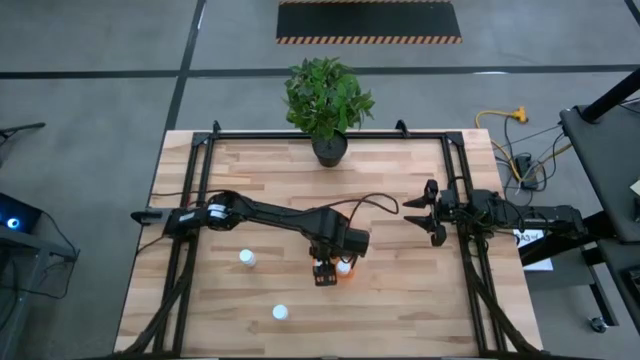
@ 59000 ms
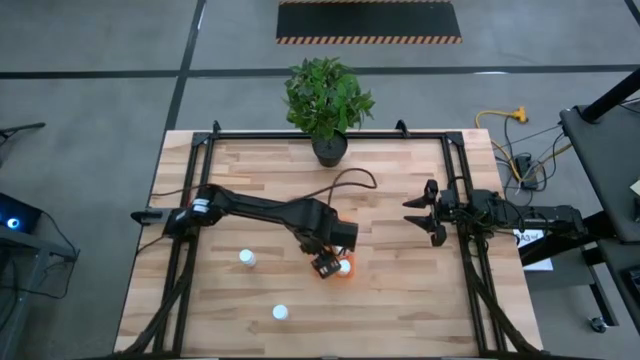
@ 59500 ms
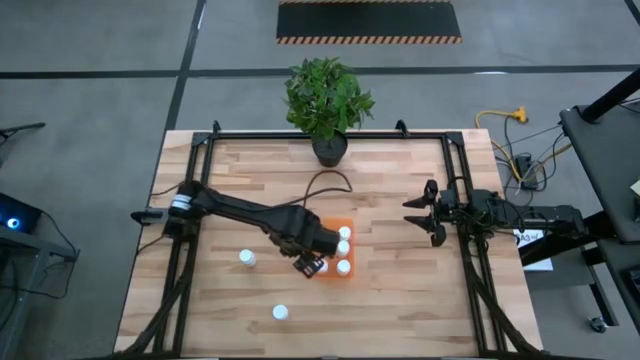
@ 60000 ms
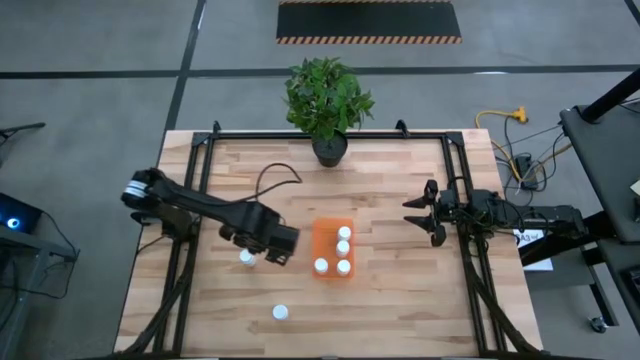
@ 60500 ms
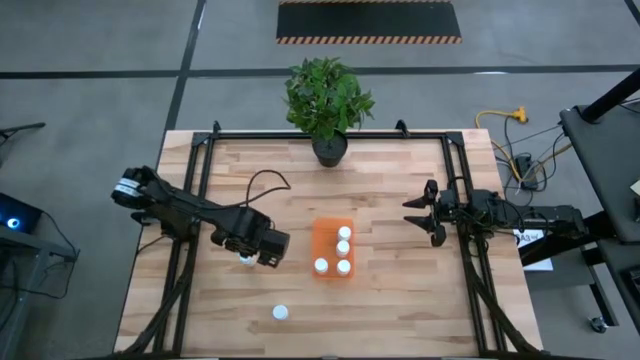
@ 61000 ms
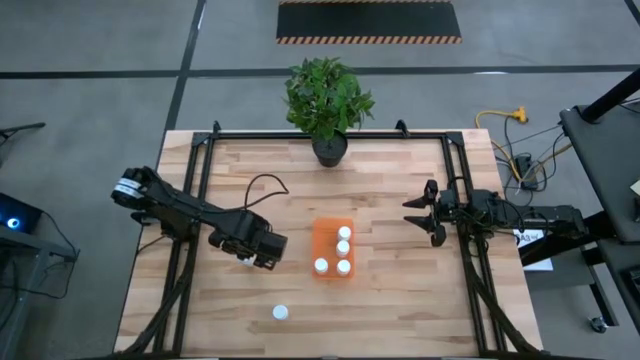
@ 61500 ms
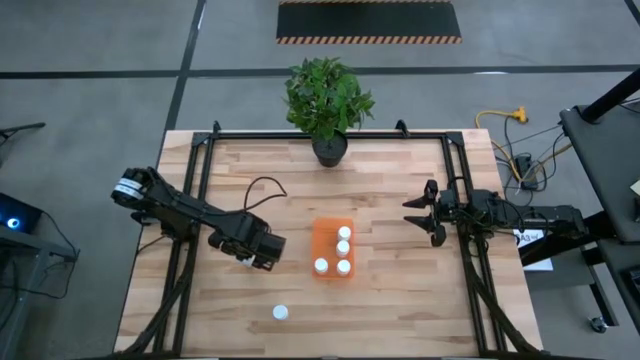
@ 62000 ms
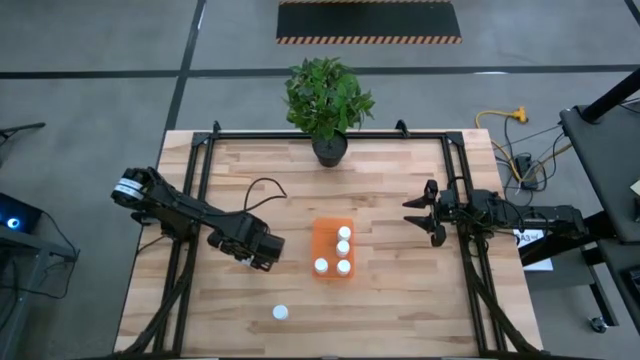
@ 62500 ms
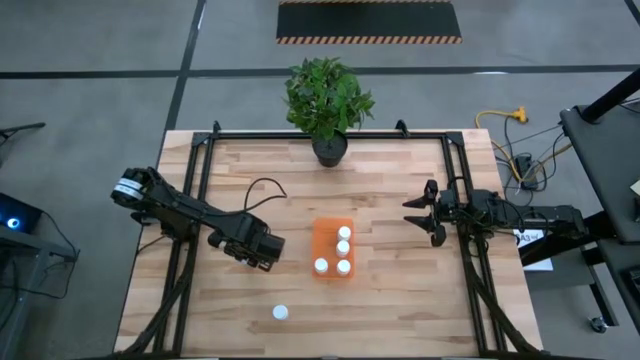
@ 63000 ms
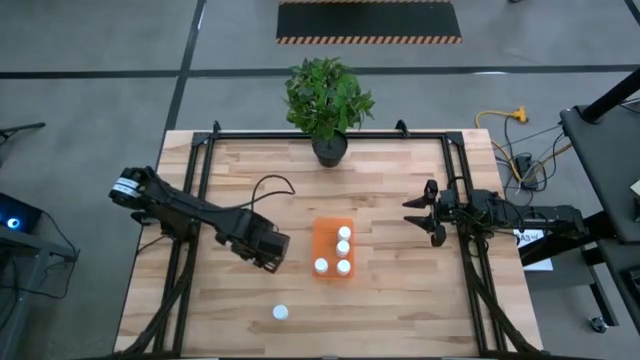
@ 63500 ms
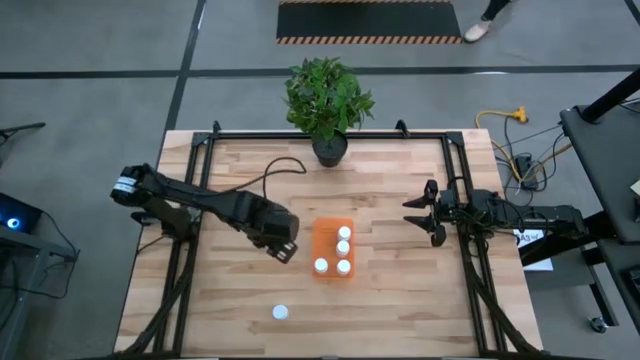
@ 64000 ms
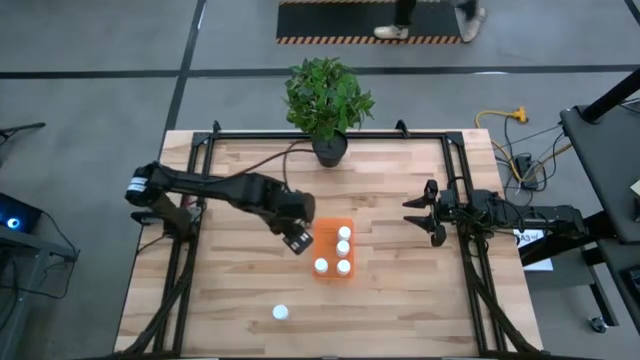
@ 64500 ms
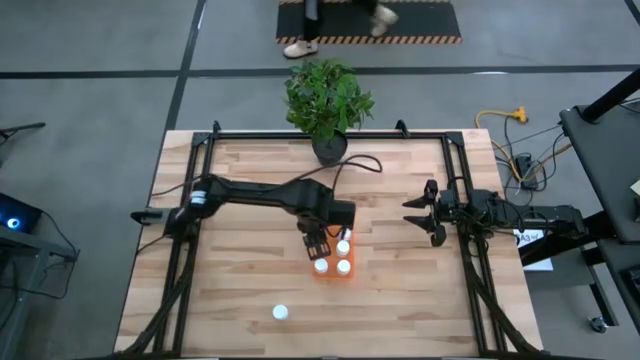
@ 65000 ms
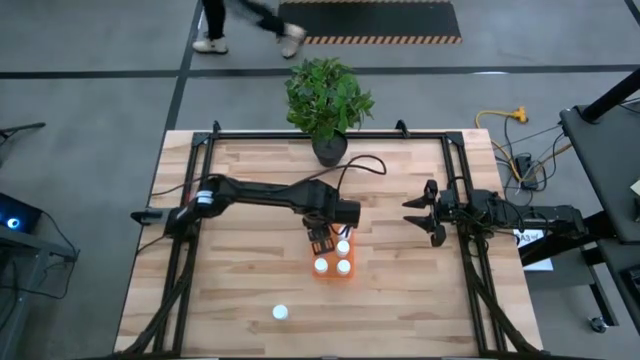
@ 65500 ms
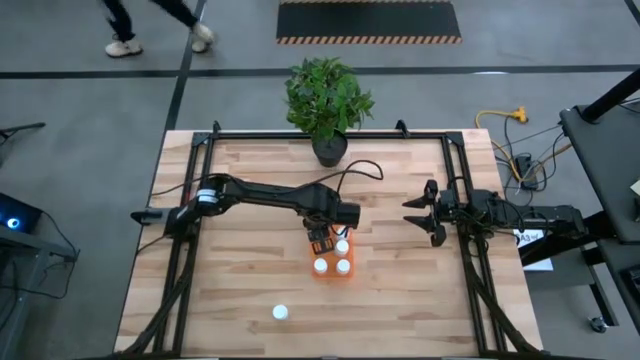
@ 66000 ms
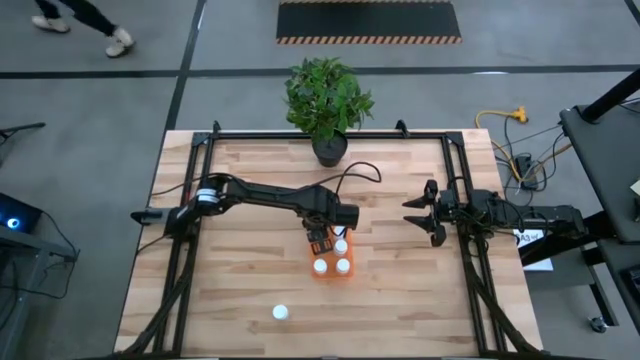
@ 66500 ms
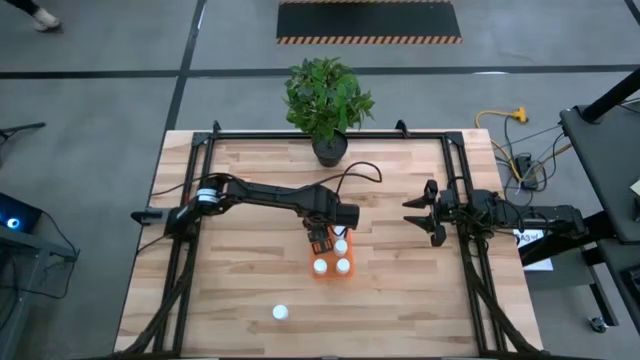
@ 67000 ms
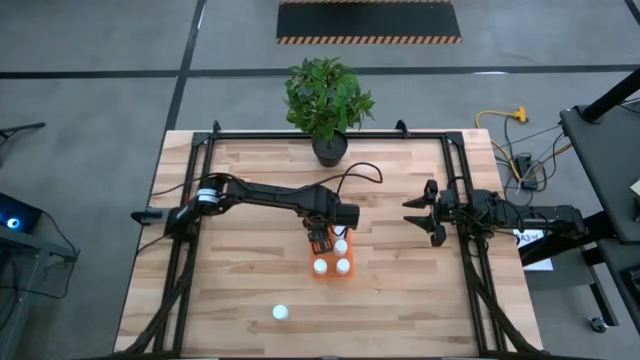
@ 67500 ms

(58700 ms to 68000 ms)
Task: Pick and place pill bottles into a basket
Put the white pill bottle into the orange bin

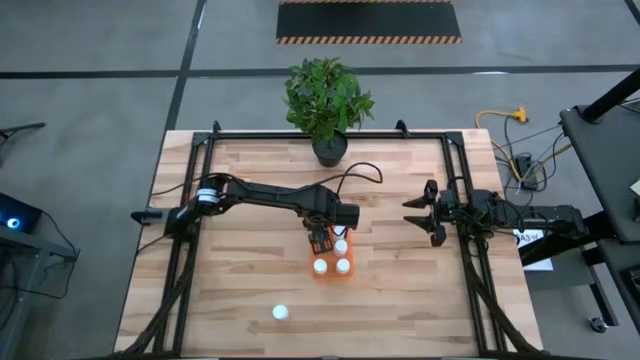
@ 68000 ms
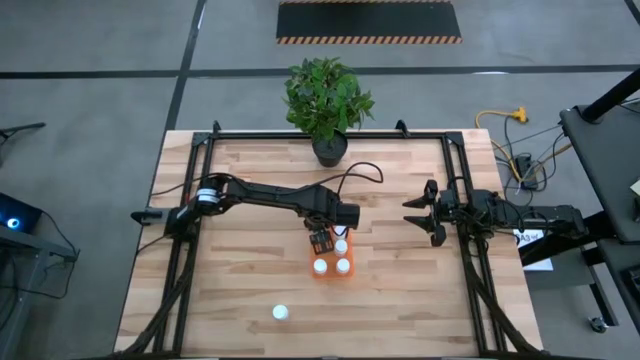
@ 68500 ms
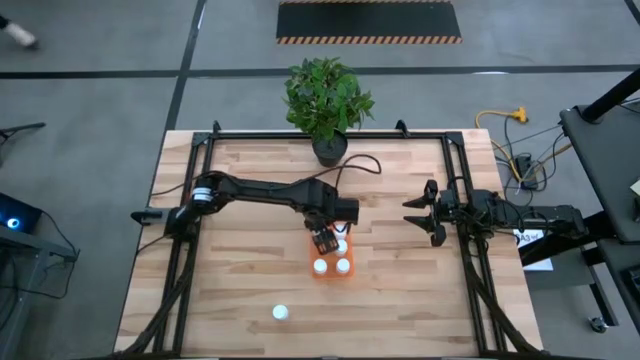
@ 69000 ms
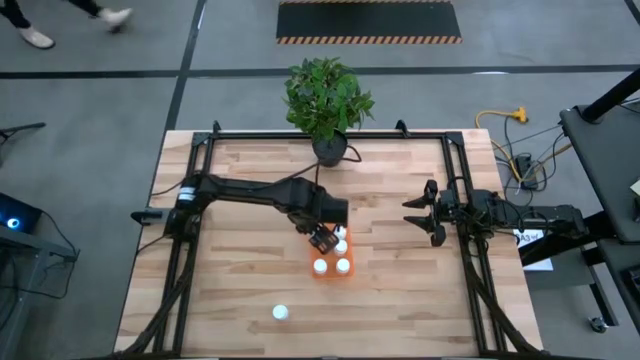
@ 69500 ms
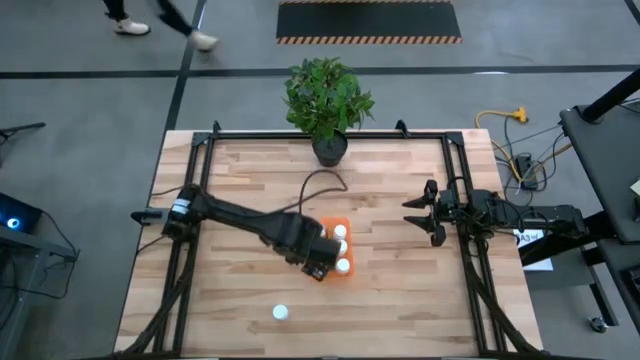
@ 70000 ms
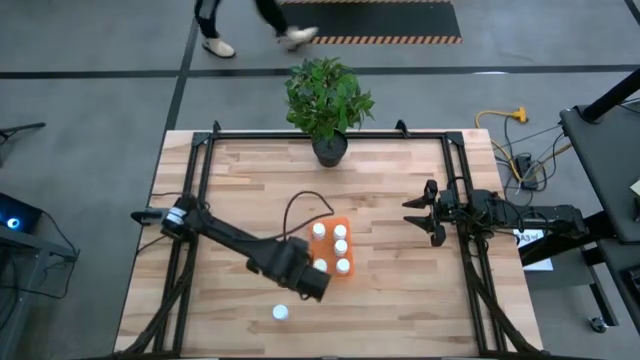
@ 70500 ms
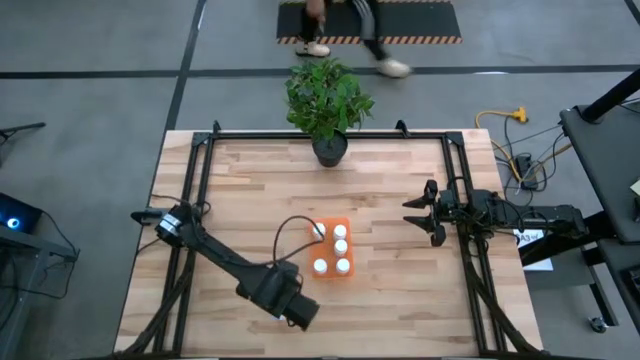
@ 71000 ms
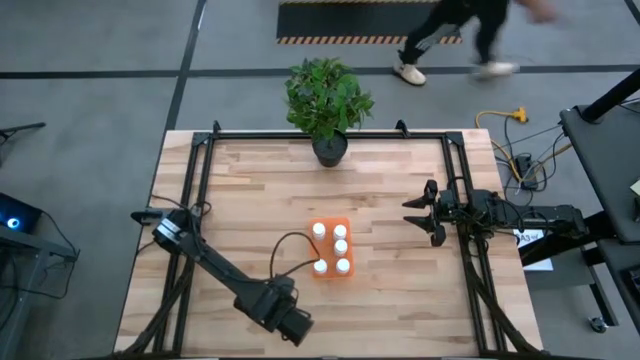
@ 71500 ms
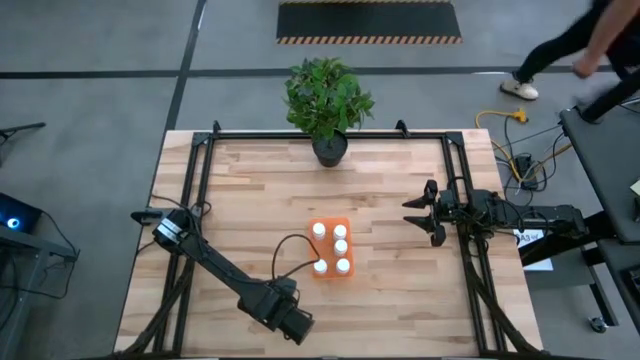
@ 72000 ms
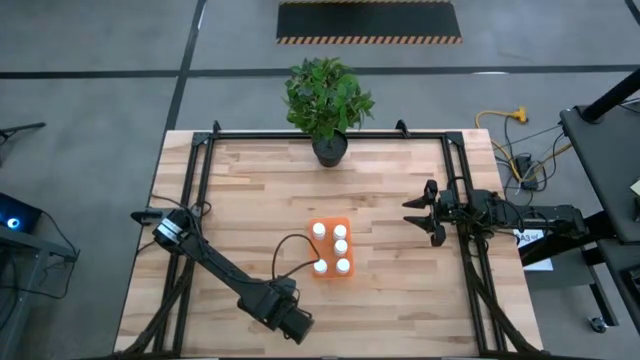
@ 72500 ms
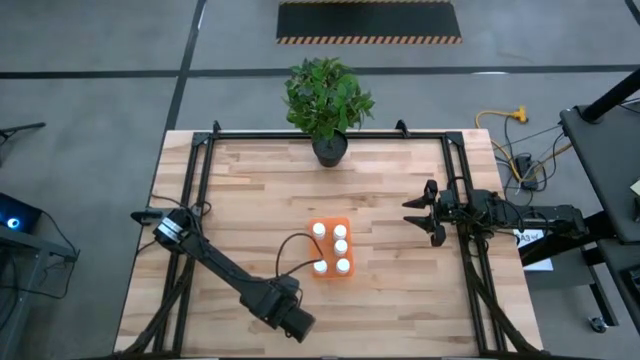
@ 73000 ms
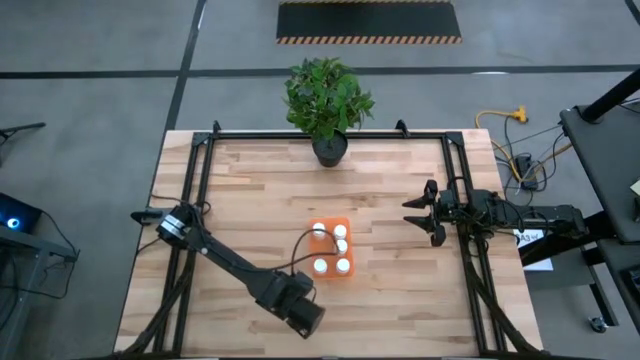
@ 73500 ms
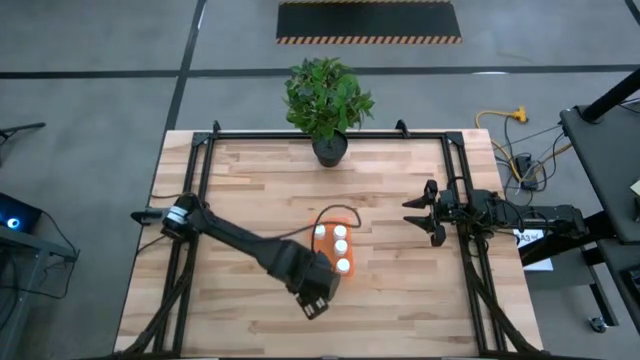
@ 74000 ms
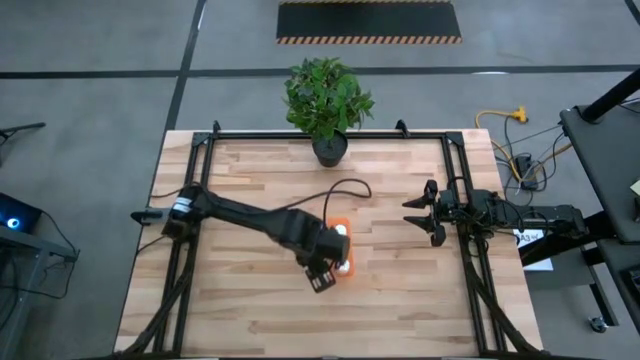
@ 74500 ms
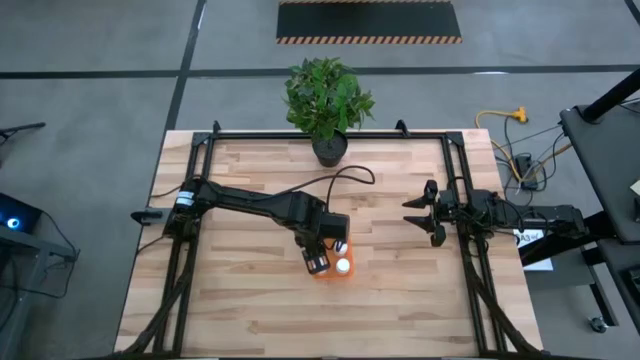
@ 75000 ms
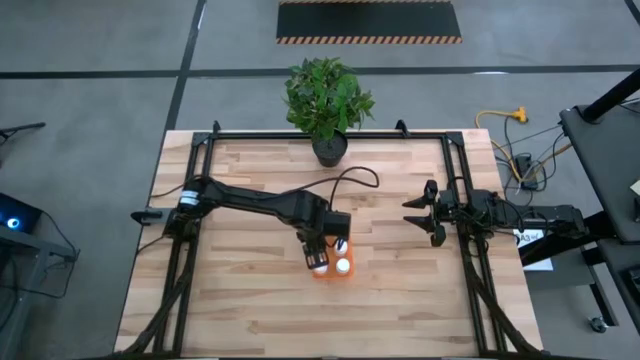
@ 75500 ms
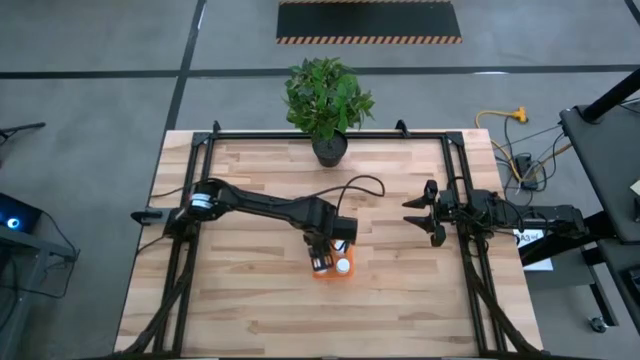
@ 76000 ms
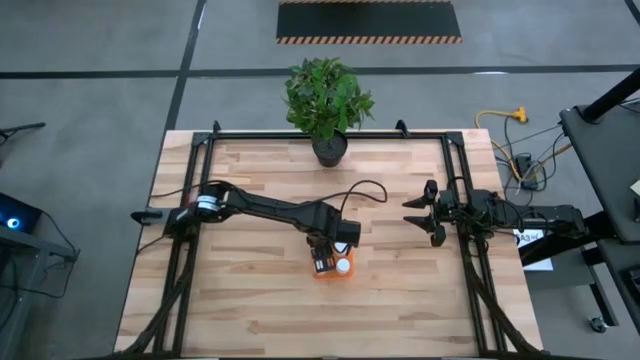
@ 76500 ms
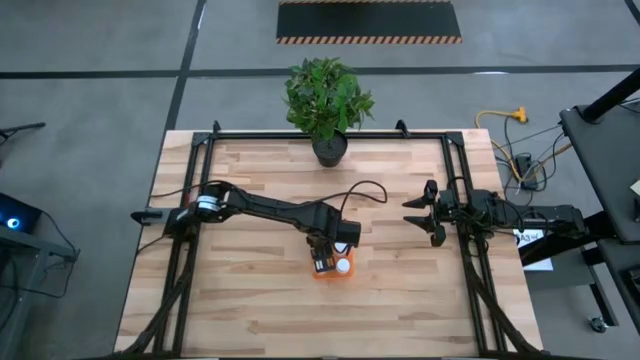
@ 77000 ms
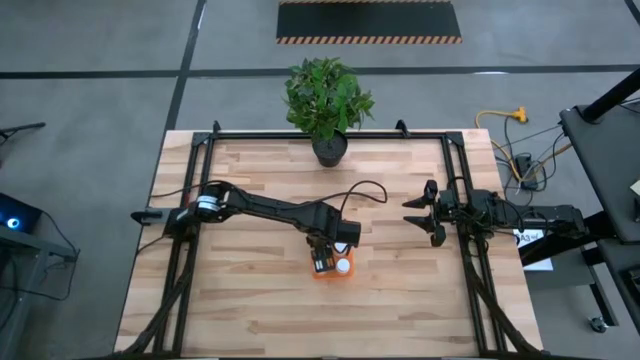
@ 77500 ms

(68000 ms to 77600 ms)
Put the white pill bottle into the orange bin

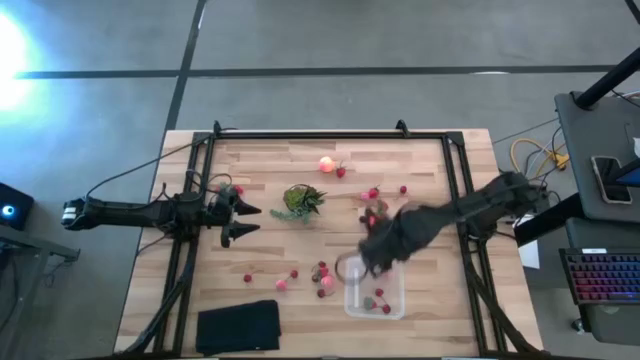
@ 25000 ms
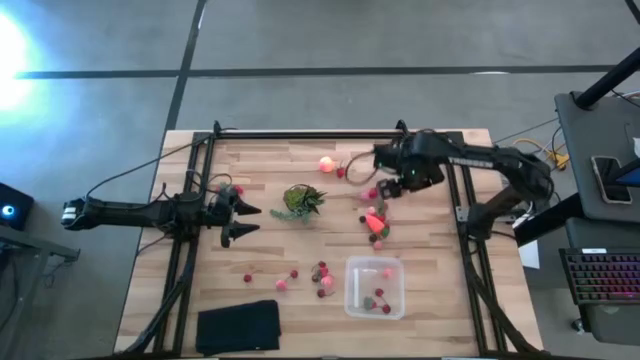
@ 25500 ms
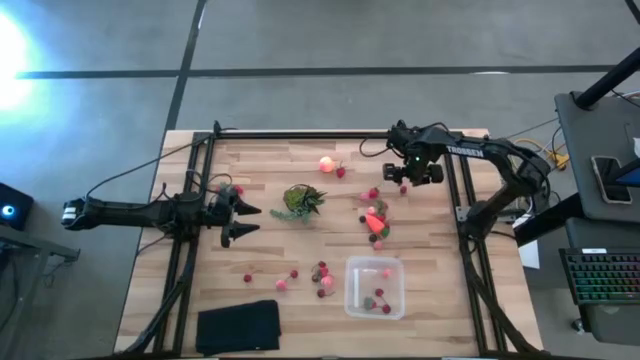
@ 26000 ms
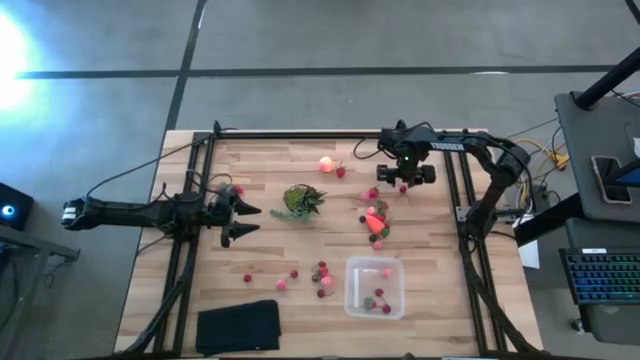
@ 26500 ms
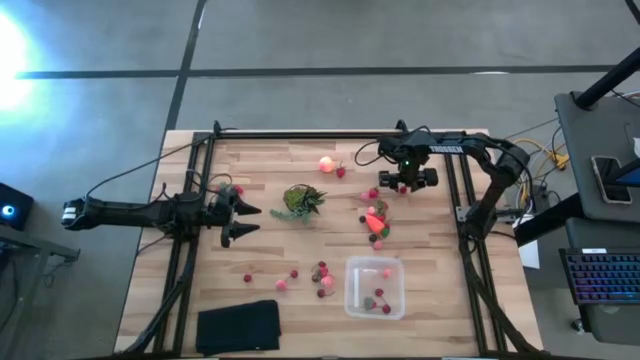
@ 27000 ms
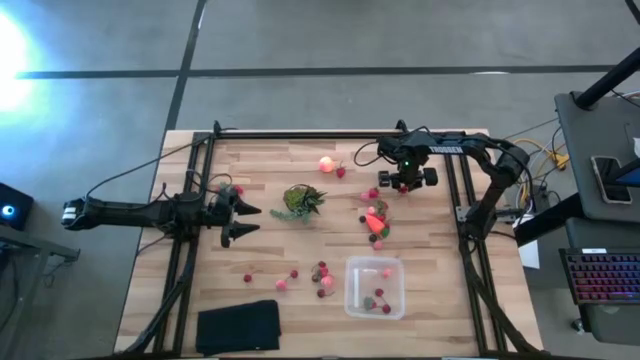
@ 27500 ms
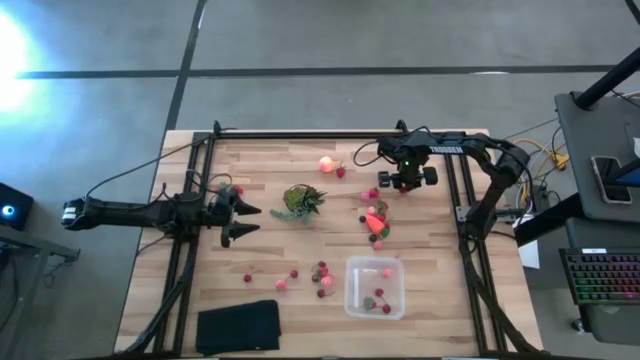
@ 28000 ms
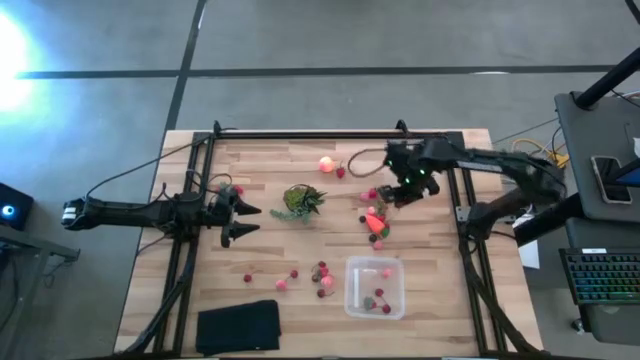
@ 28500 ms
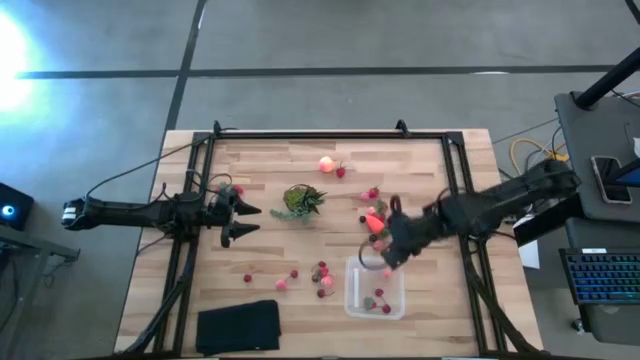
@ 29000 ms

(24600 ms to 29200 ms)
Task: Pick and placing Produce into tupperware
Put the cherry into the bin
